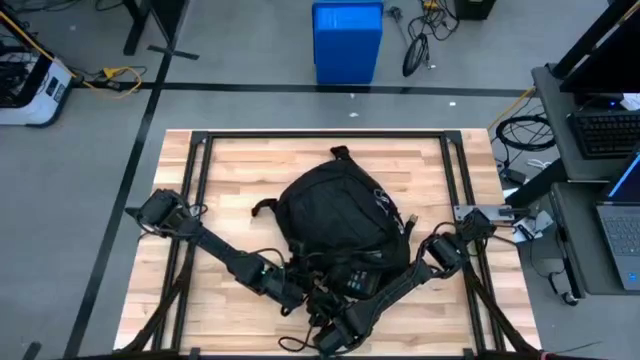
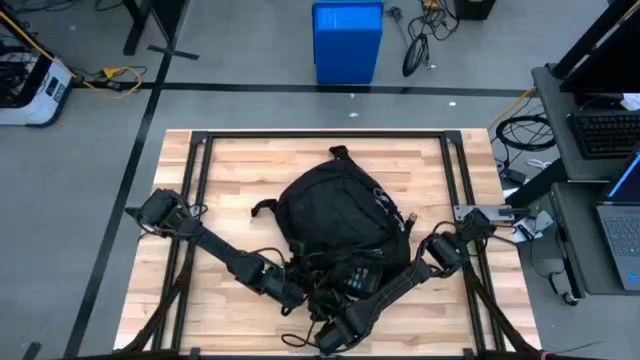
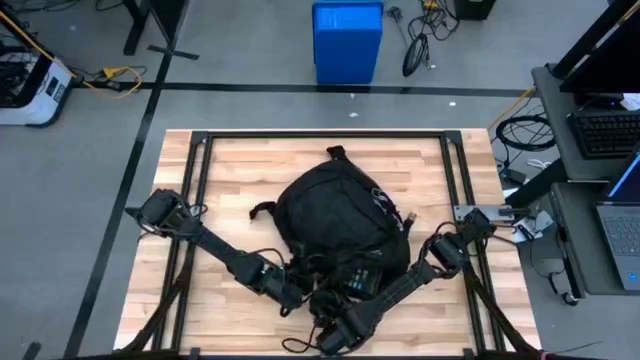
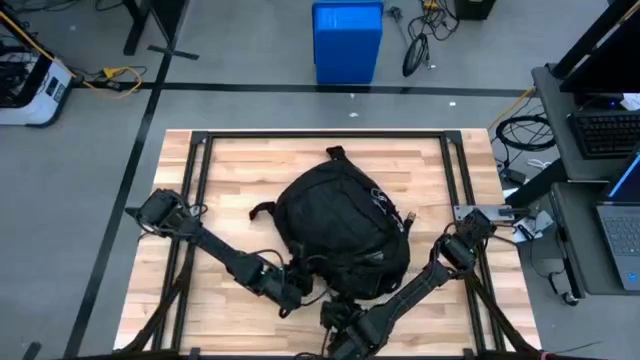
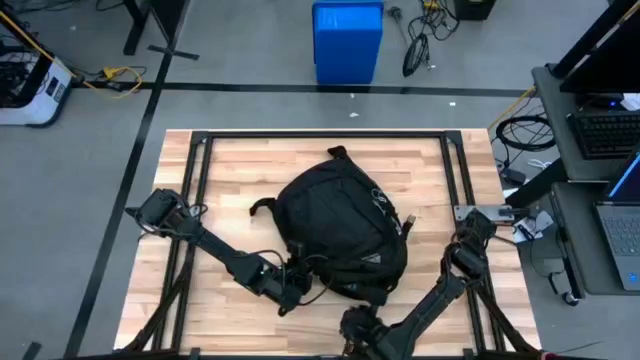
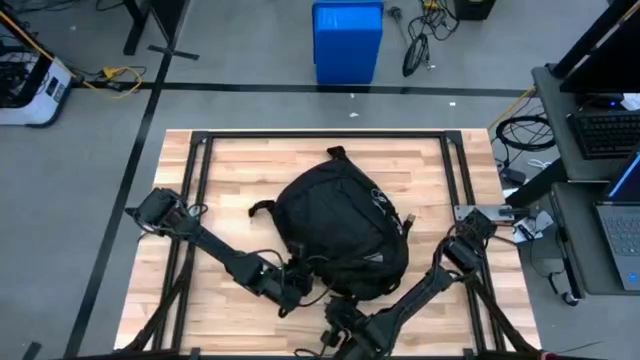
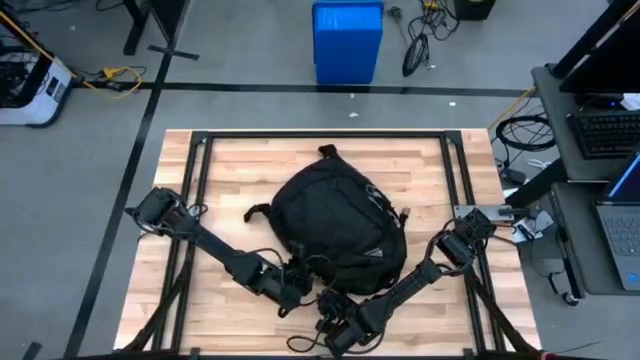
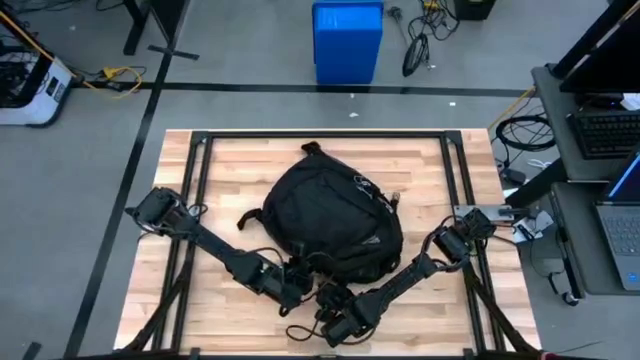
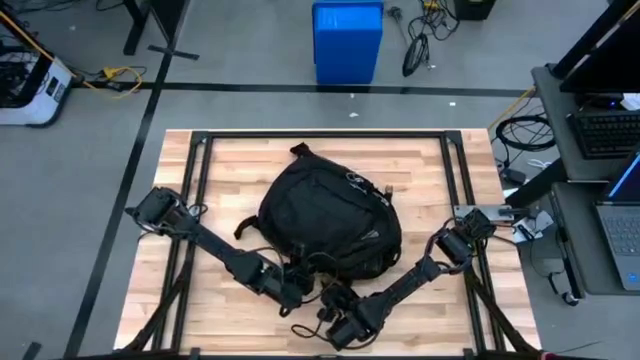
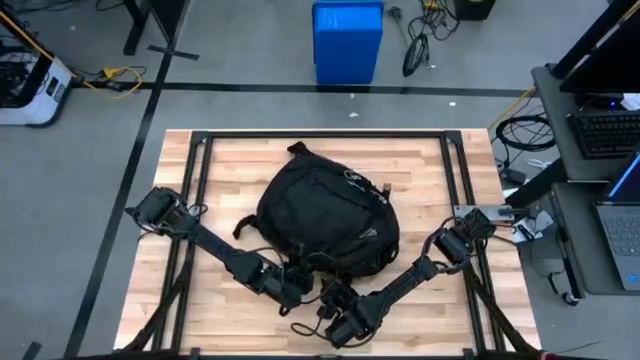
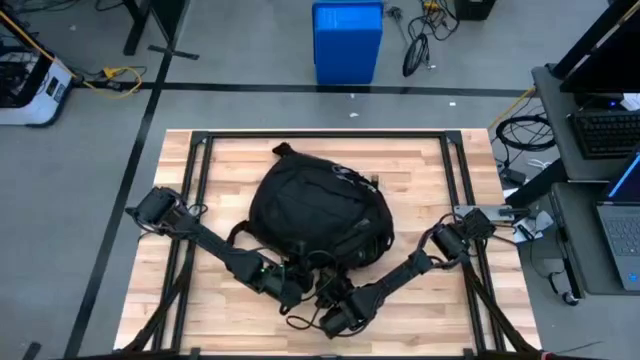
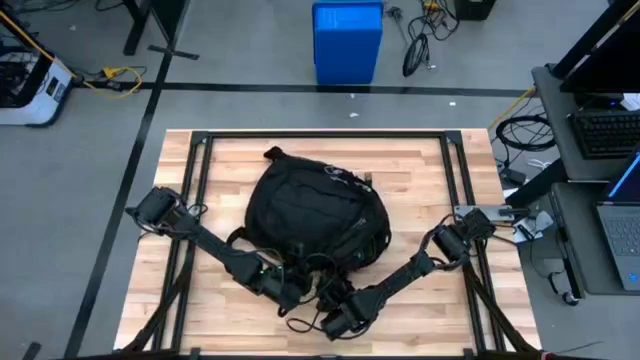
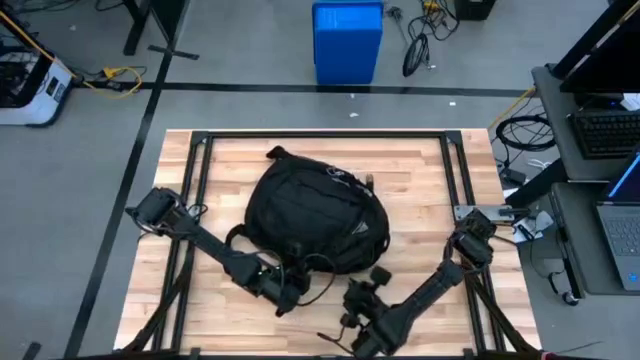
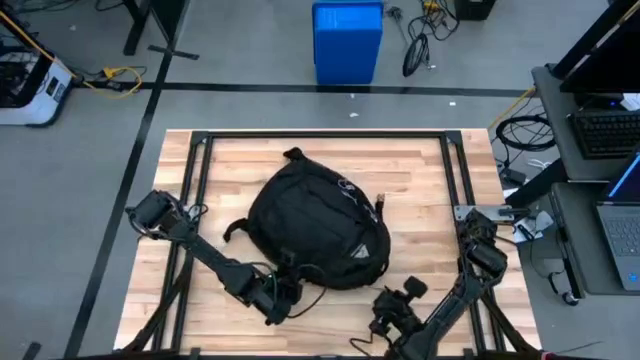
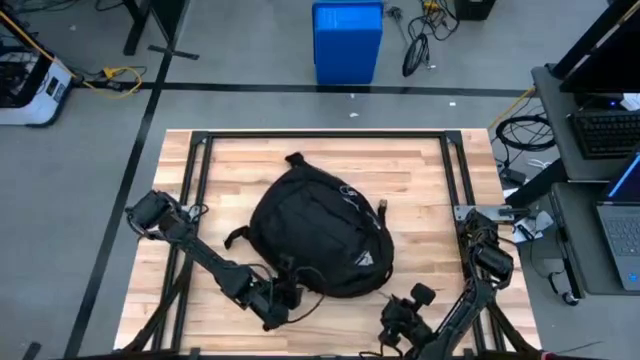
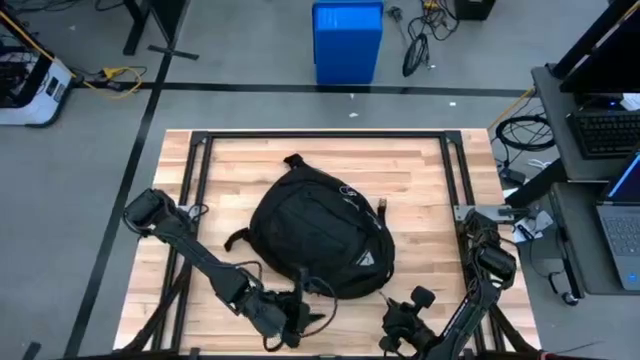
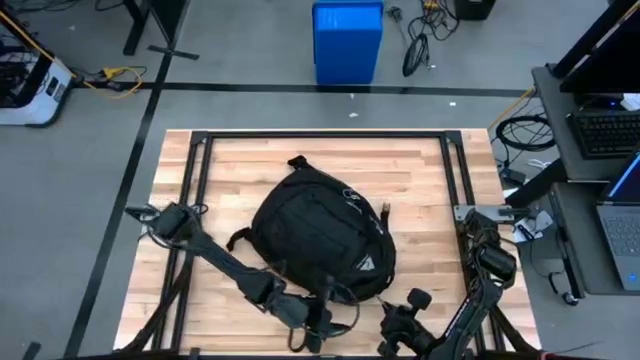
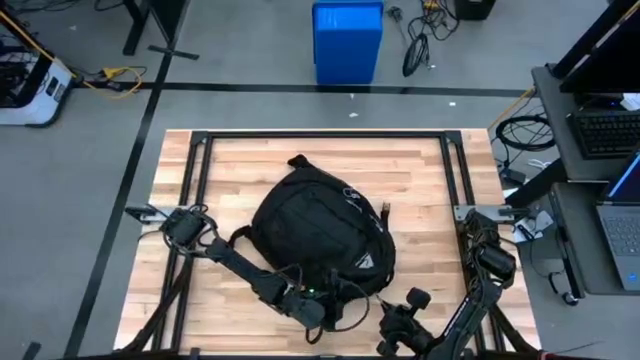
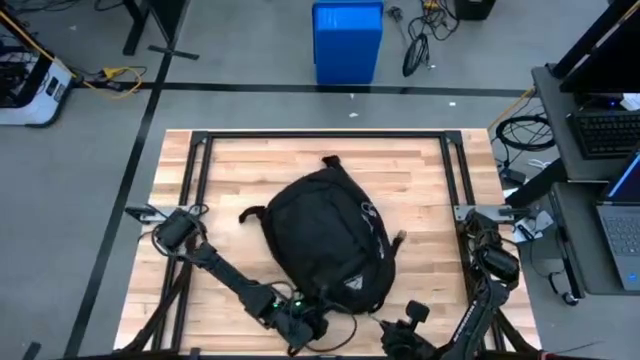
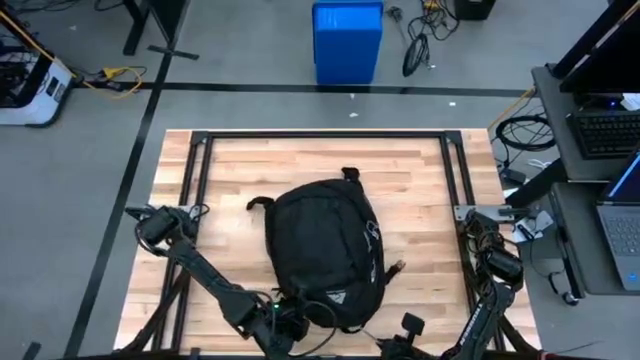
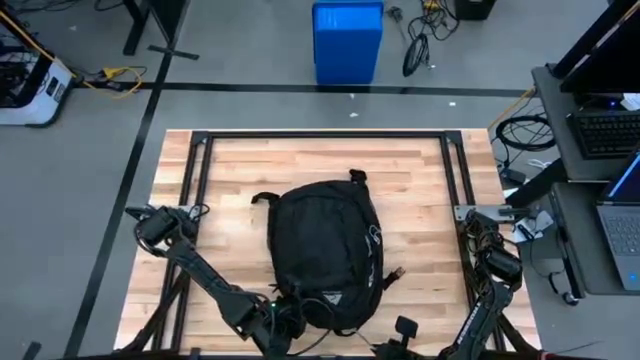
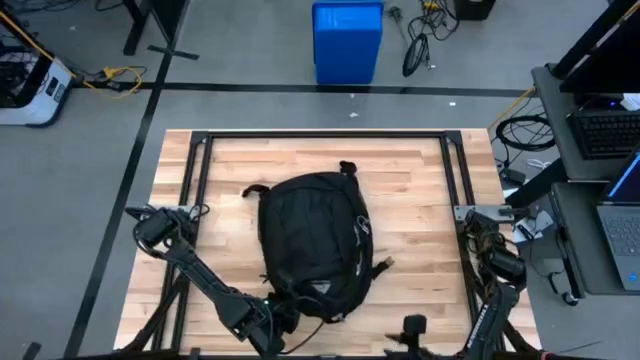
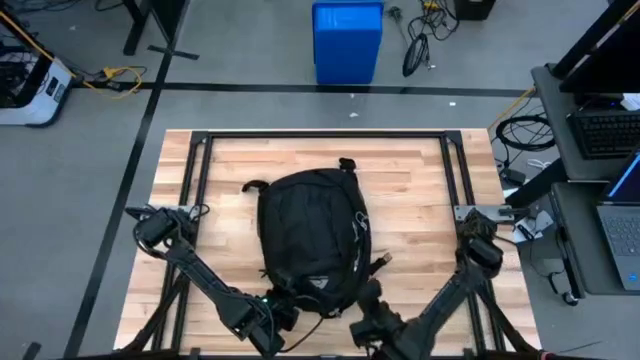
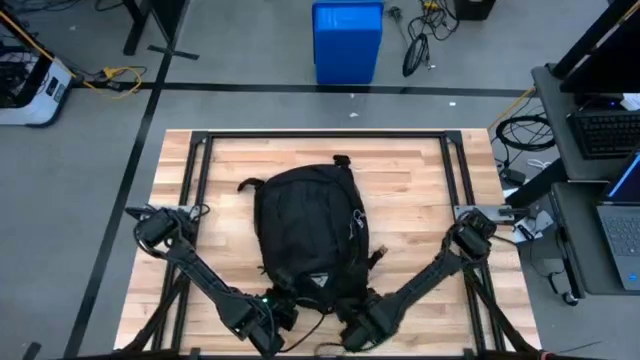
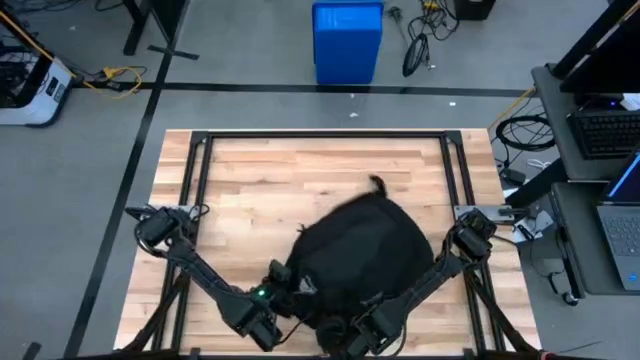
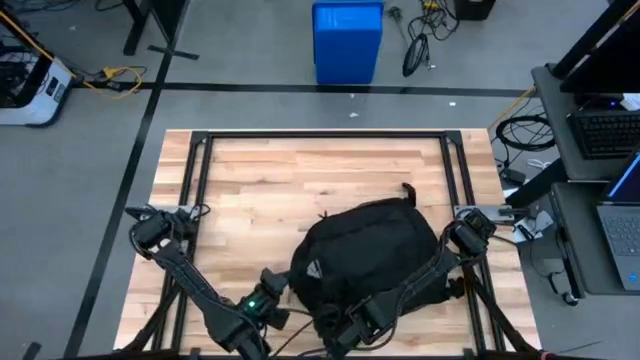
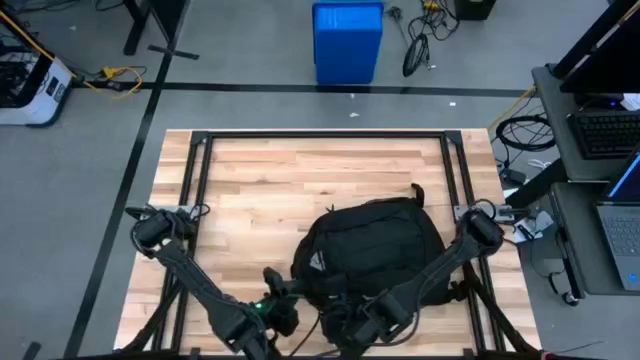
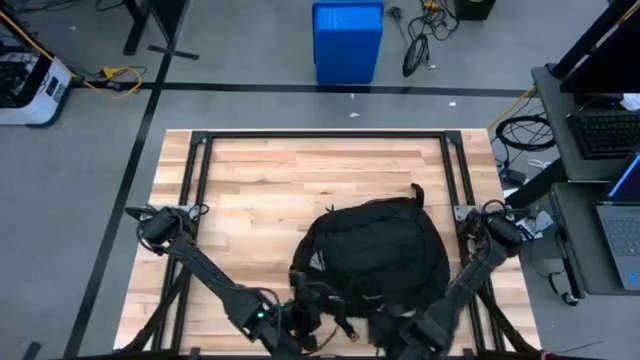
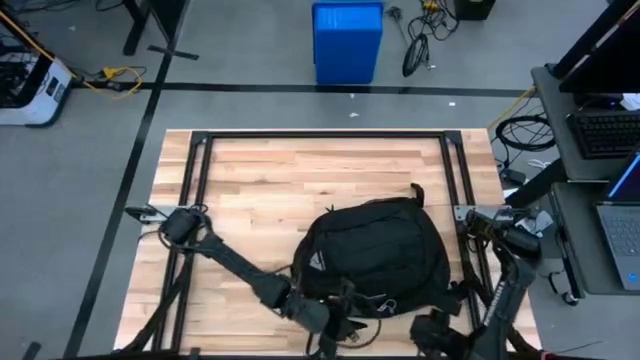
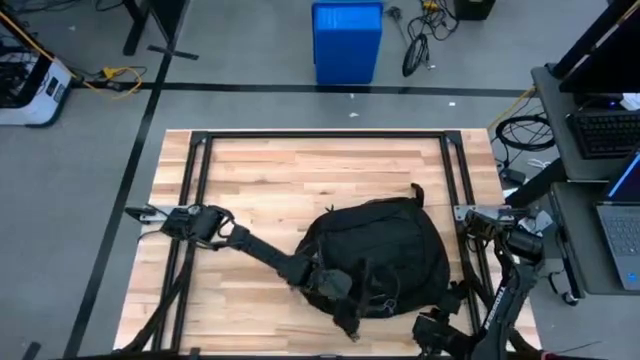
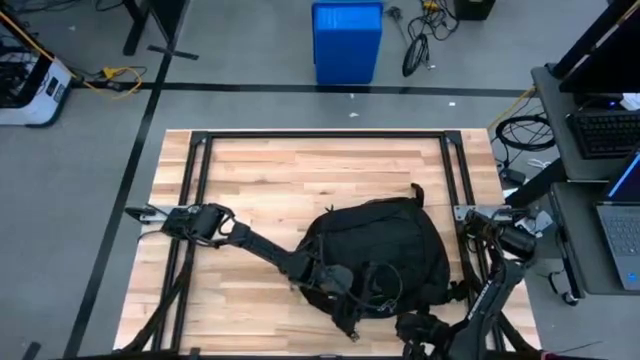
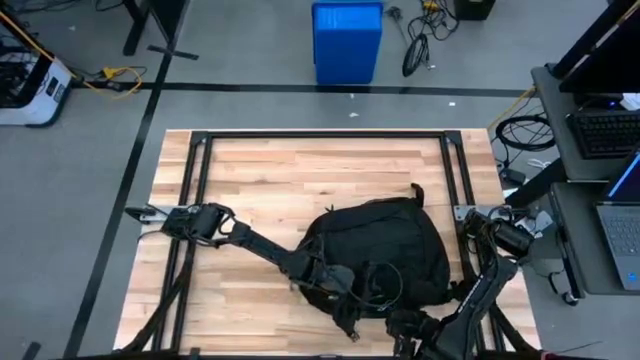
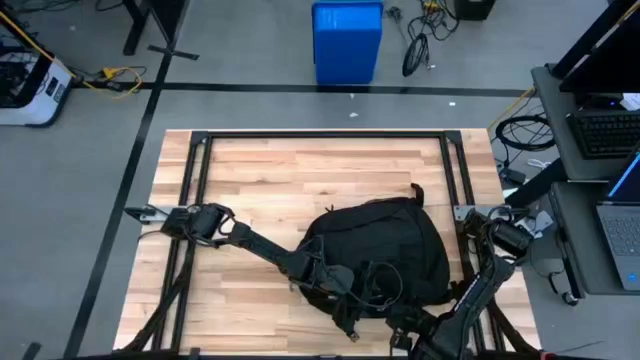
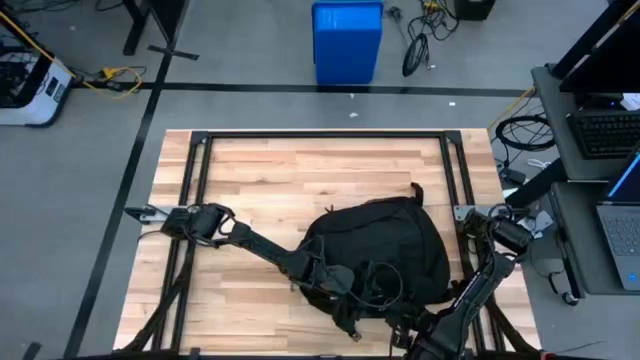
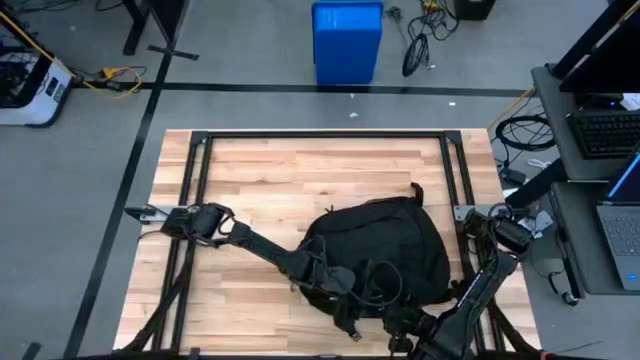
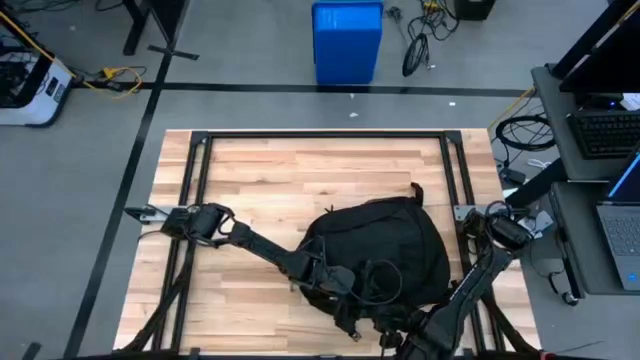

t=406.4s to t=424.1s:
Task: Unpack backpack
Close the black backpack

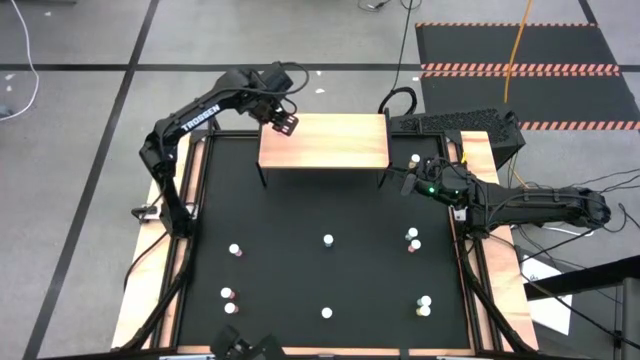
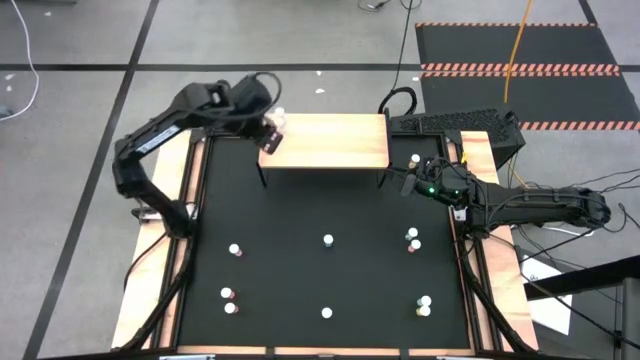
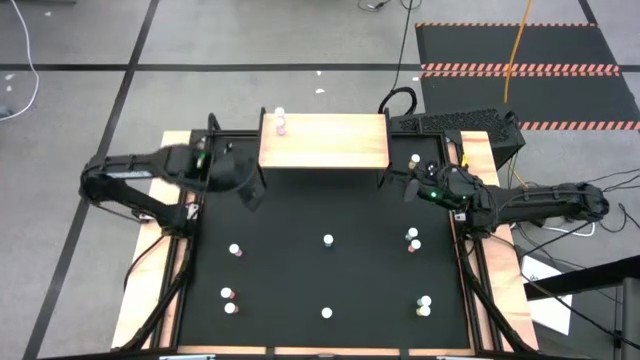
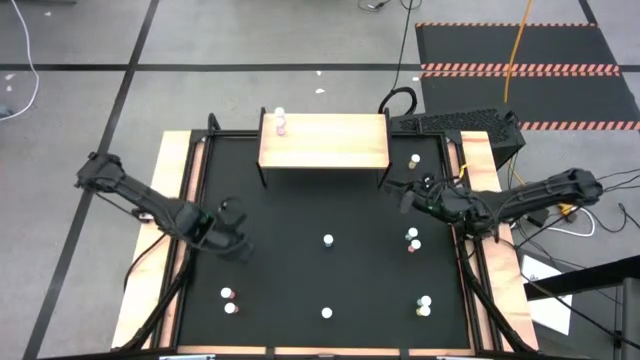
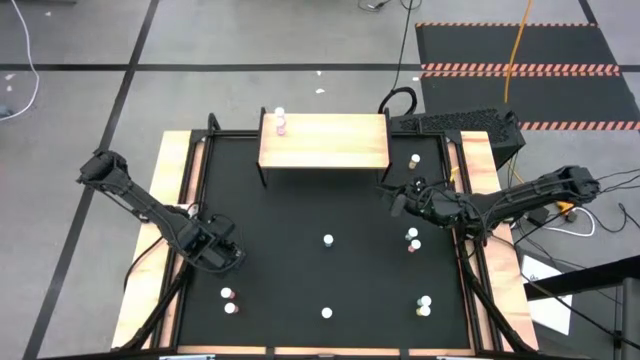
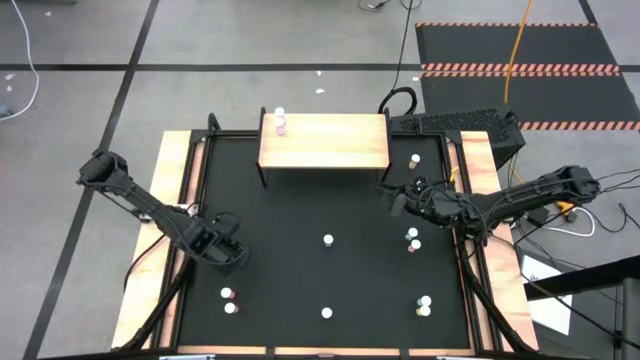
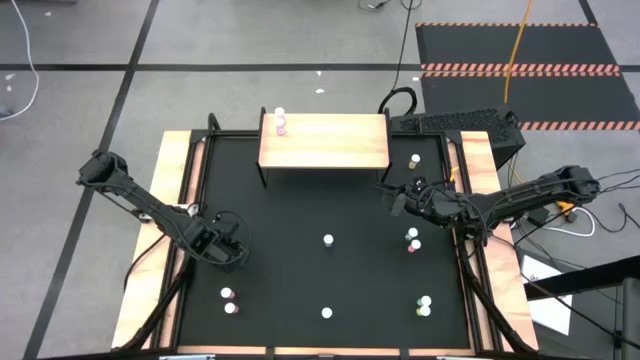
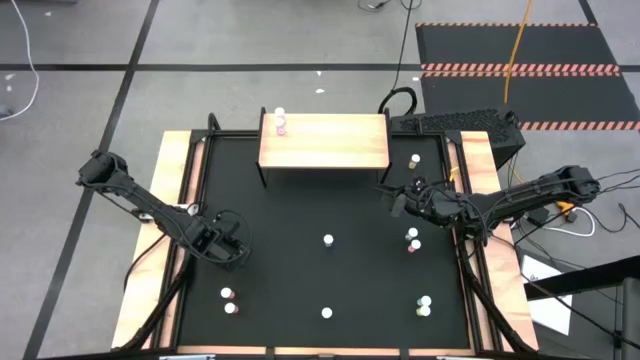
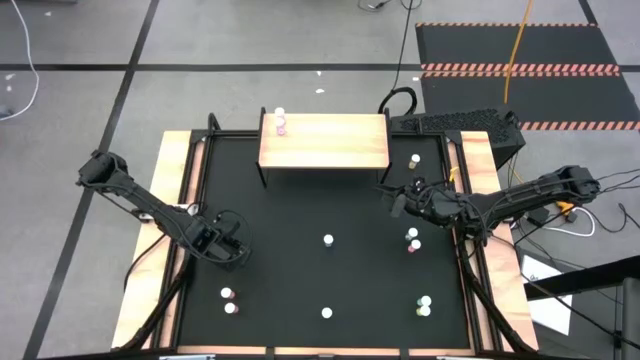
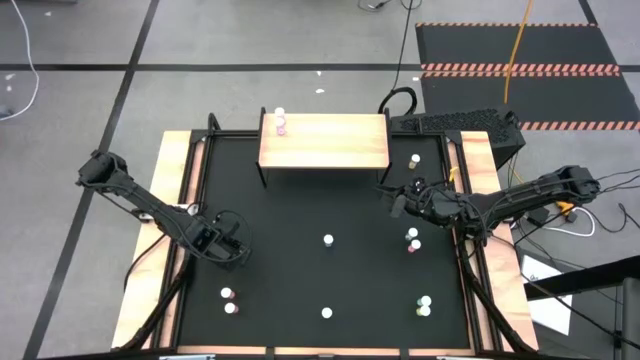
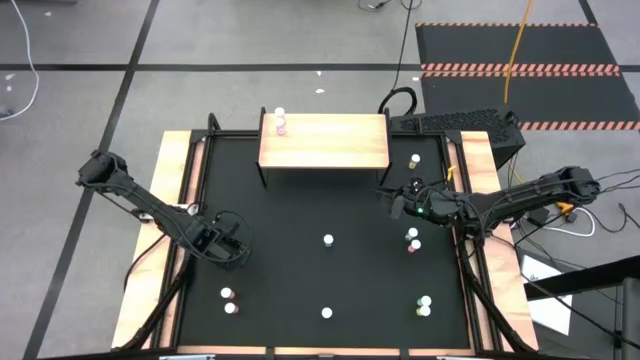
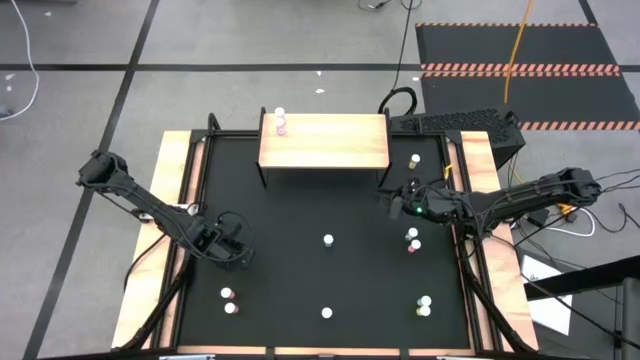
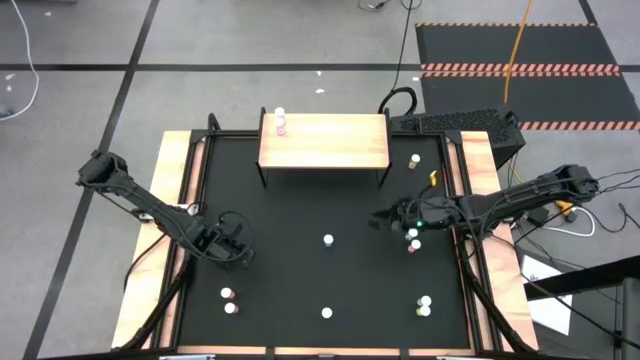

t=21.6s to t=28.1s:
Task: Pick and place medicine bottles onto shelf by color
Adjust the violet pill bottle
